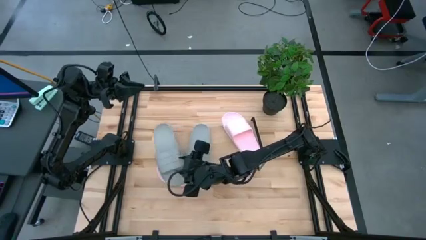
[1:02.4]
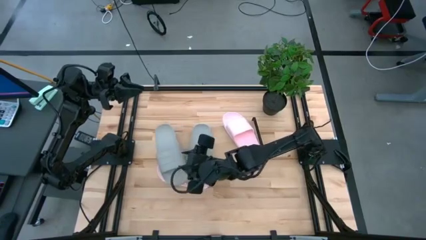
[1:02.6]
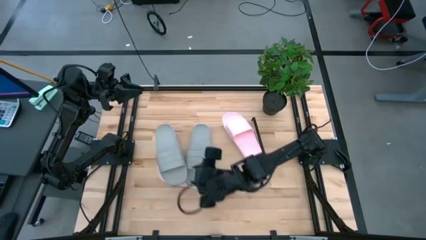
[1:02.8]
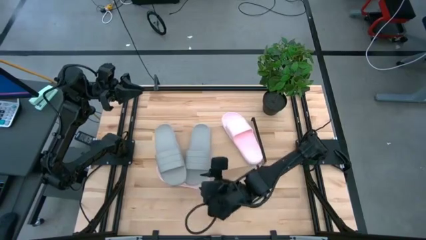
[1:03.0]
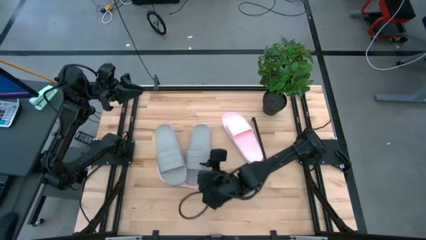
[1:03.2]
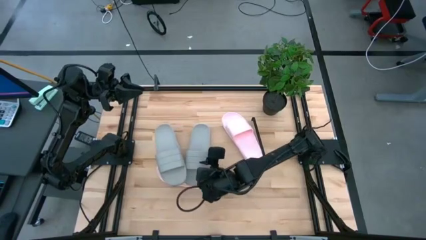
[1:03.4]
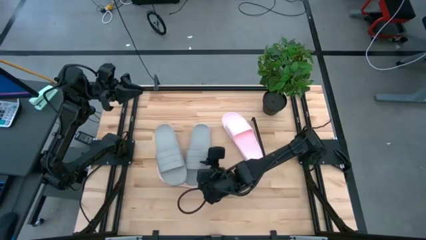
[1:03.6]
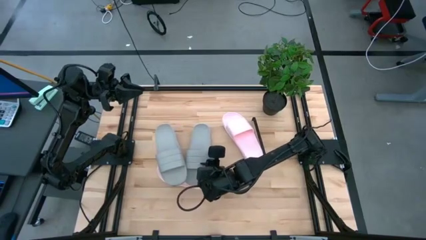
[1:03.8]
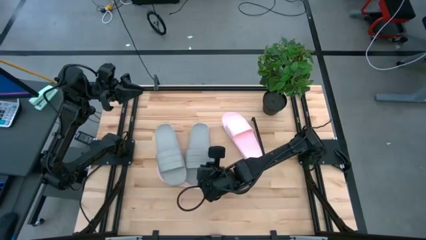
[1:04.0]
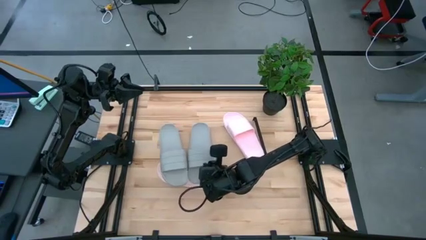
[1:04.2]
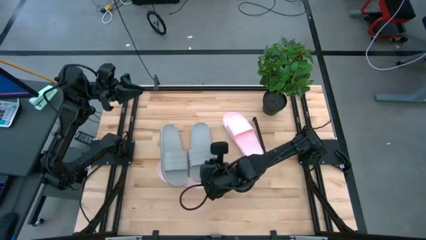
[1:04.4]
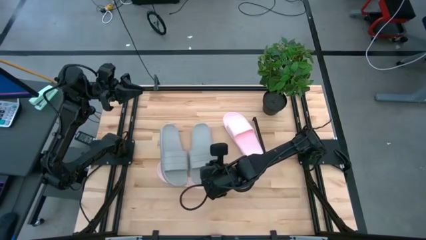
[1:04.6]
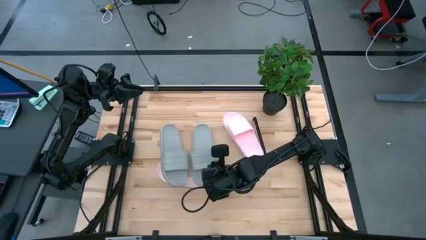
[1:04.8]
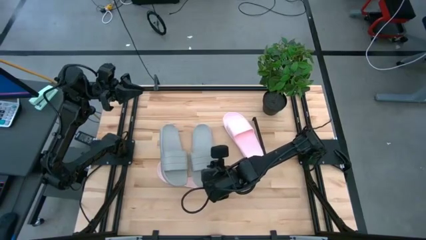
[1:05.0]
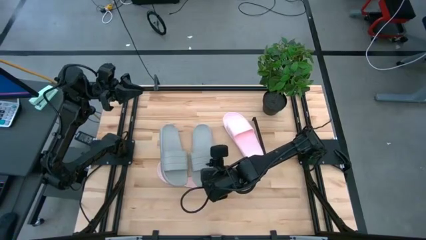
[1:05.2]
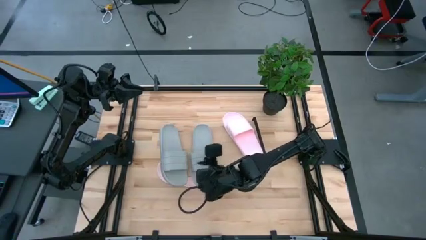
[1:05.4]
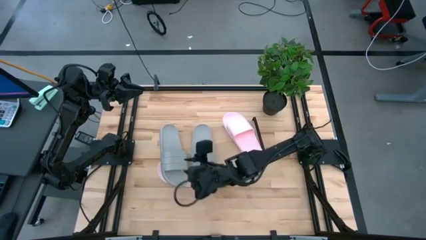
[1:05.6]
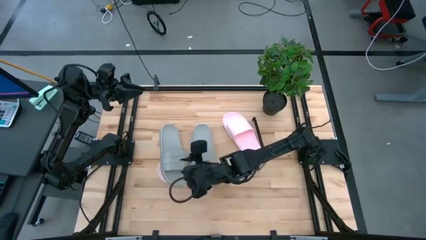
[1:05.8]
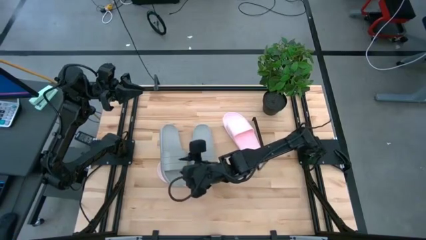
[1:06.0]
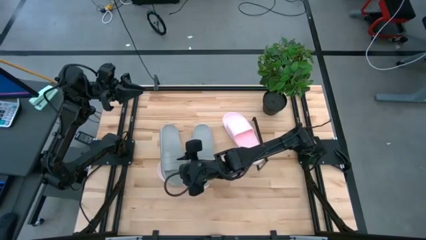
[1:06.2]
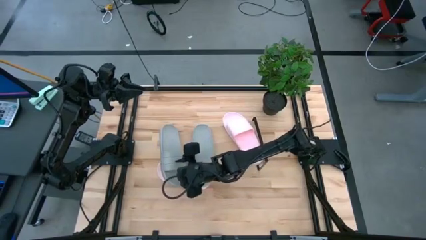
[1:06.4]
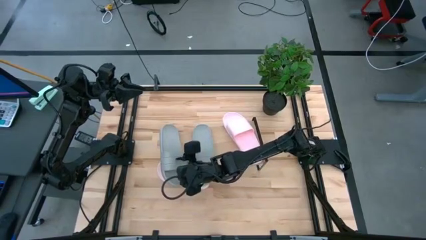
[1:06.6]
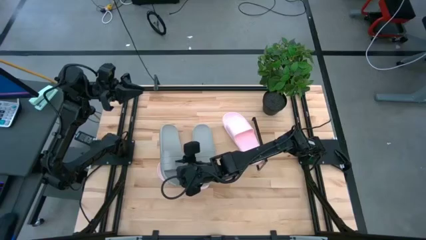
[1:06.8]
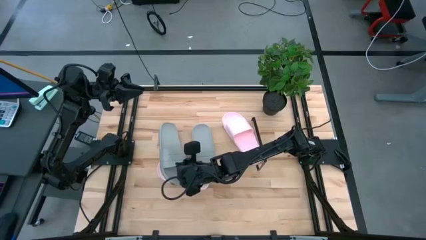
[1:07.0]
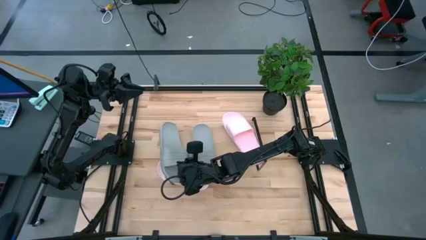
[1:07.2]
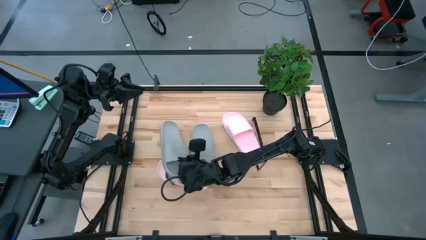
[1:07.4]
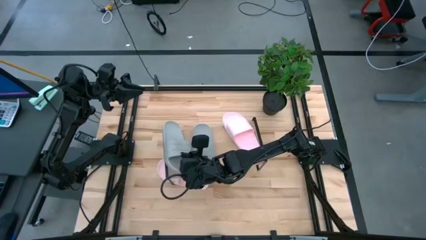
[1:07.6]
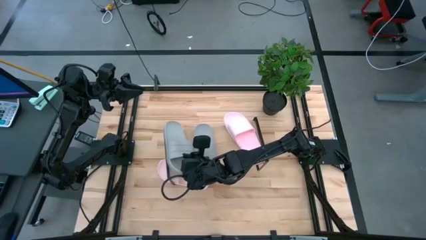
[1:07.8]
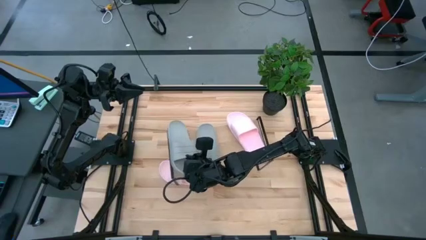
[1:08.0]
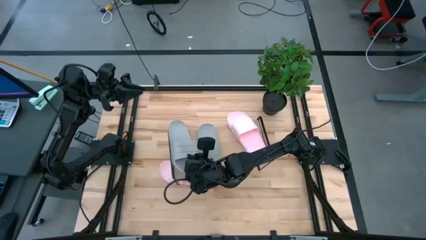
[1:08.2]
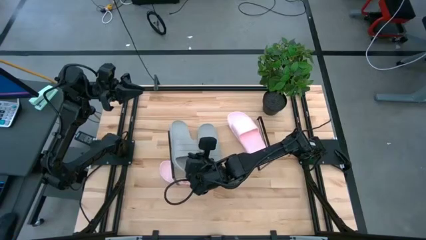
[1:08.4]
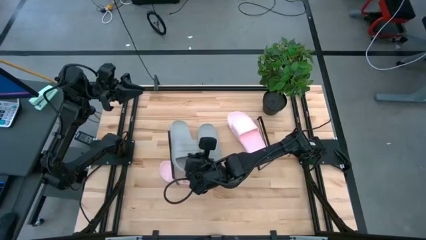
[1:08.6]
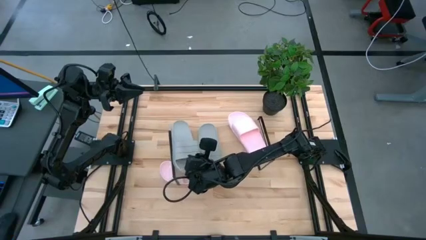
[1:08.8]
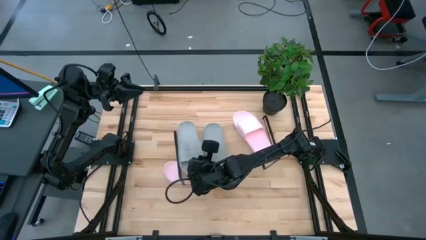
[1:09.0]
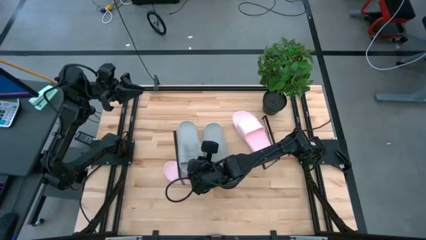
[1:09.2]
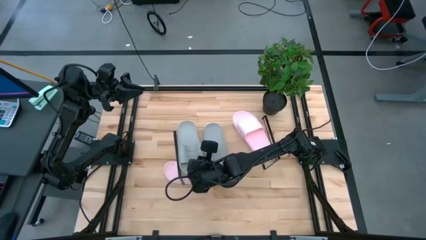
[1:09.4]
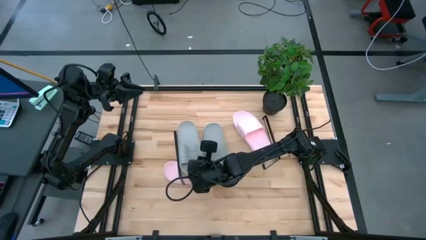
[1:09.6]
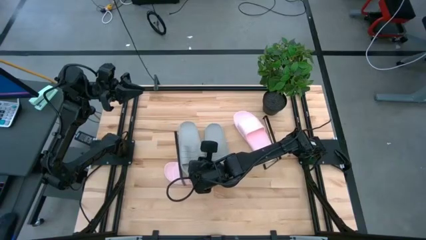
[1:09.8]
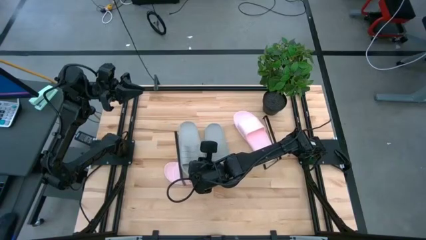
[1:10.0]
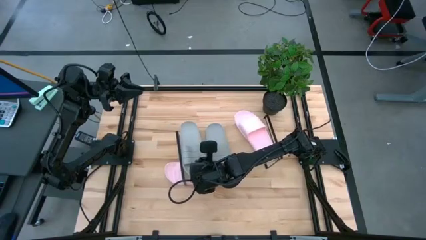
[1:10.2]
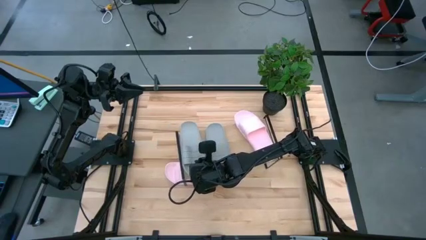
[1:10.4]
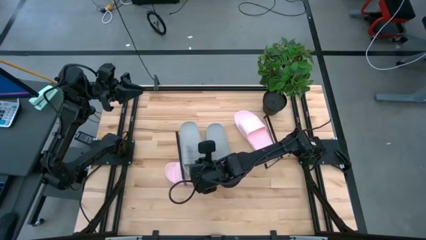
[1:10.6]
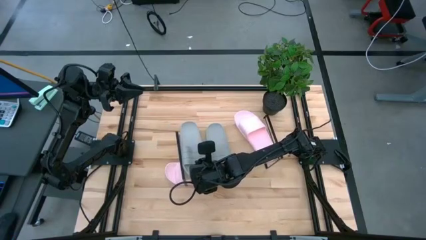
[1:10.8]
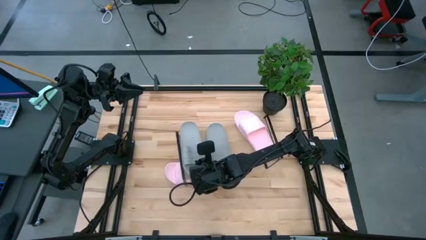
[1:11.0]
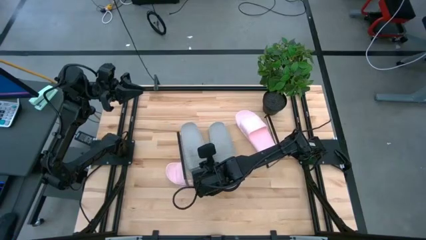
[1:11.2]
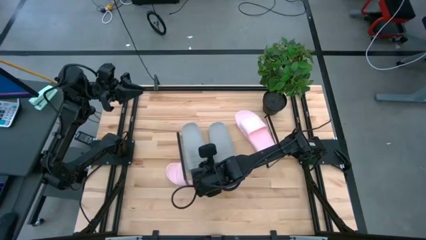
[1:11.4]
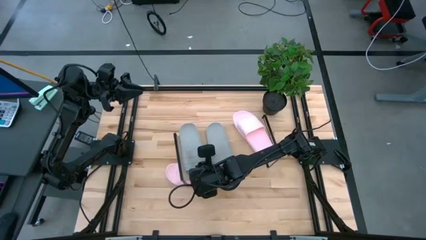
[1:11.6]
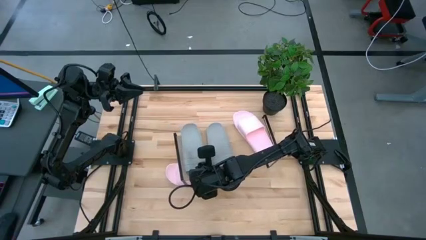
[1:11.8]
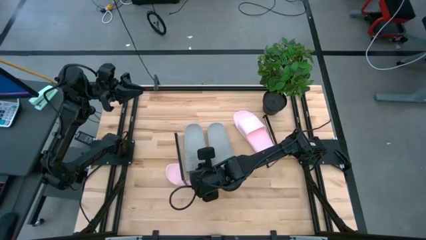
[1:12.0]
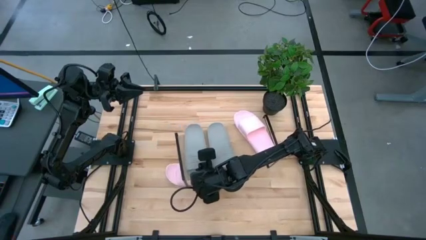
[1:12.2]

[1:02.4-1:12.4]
Task: Pick and place slides into the shelf
Adjust the gray slides on the shelf

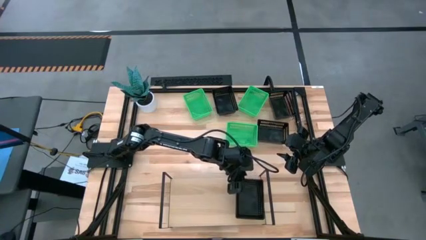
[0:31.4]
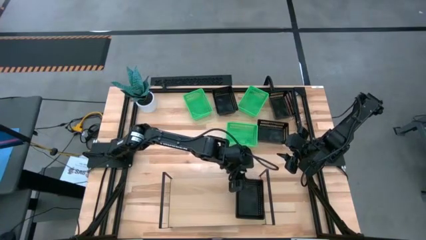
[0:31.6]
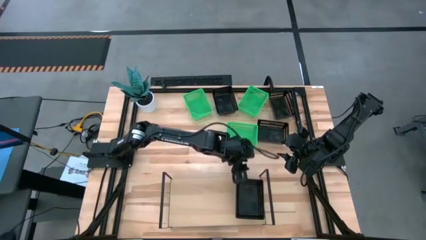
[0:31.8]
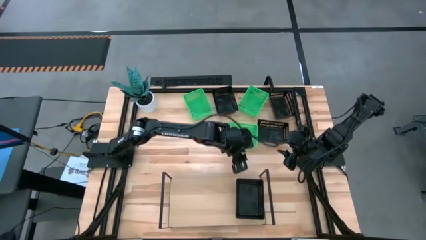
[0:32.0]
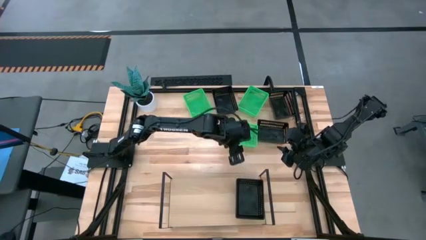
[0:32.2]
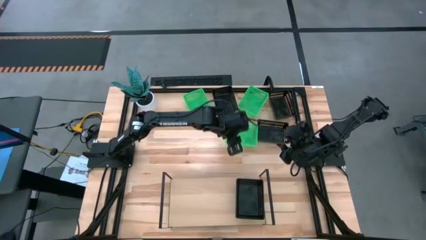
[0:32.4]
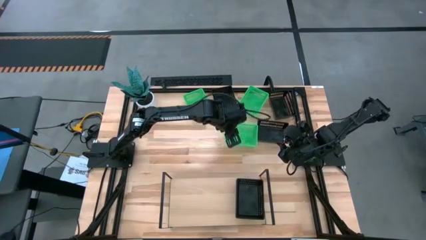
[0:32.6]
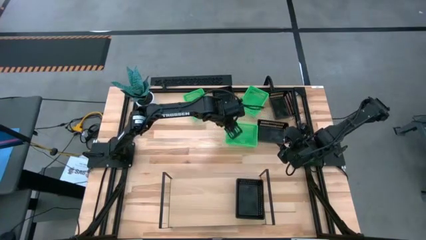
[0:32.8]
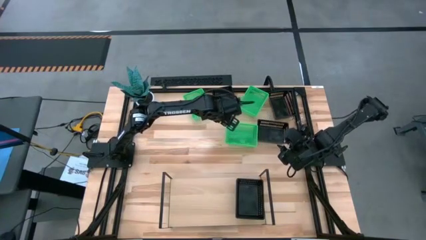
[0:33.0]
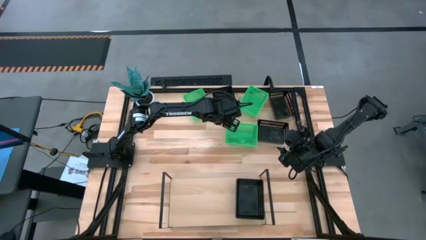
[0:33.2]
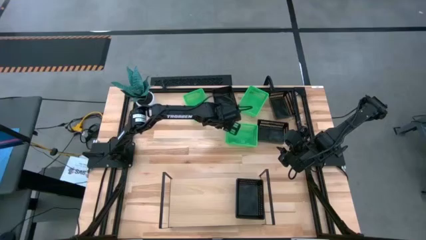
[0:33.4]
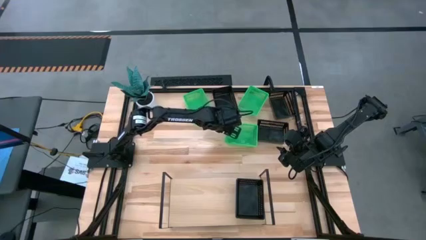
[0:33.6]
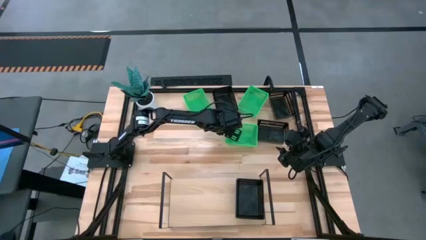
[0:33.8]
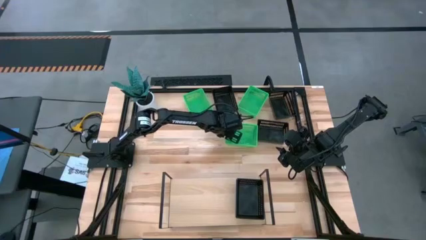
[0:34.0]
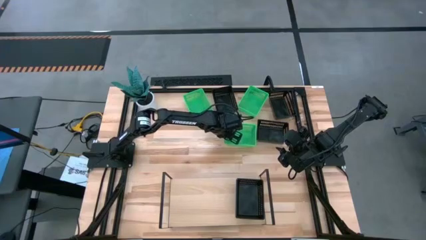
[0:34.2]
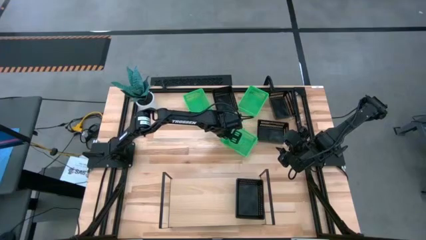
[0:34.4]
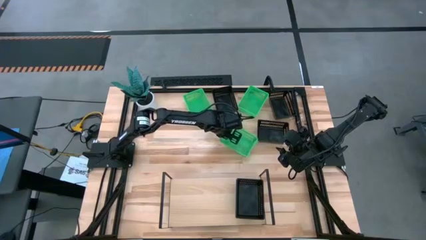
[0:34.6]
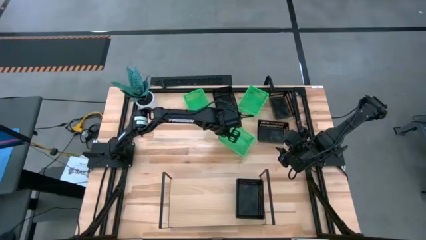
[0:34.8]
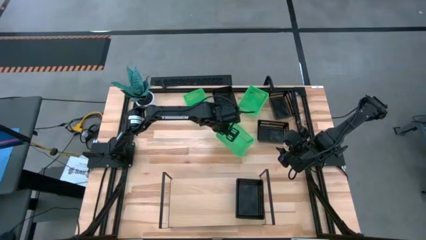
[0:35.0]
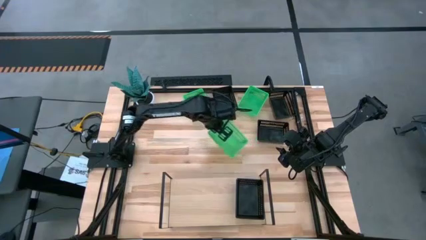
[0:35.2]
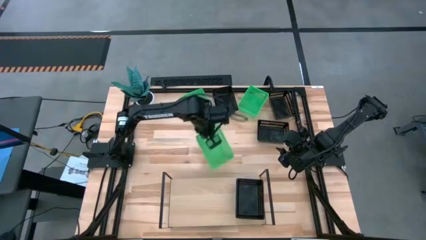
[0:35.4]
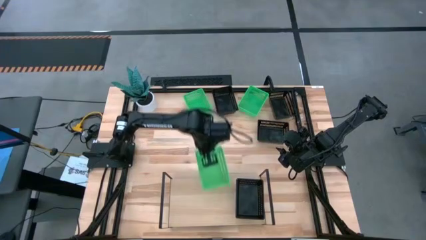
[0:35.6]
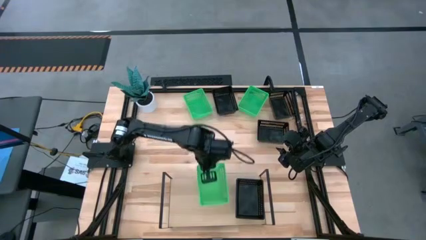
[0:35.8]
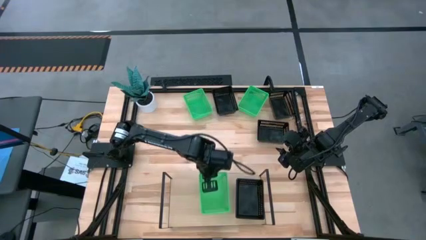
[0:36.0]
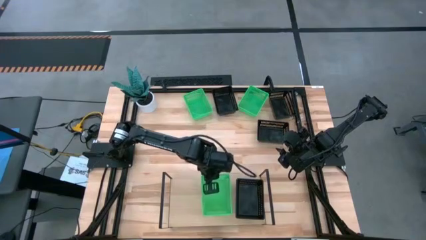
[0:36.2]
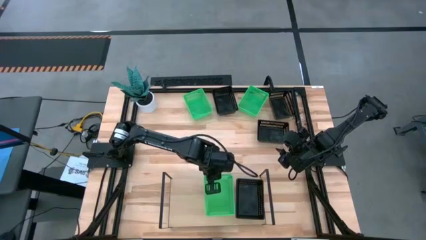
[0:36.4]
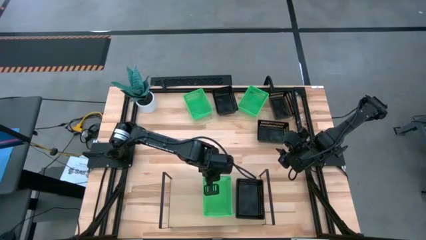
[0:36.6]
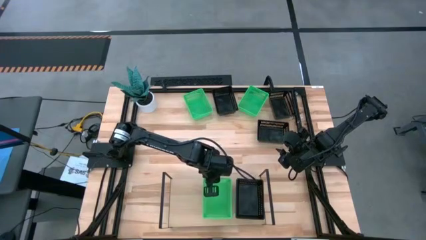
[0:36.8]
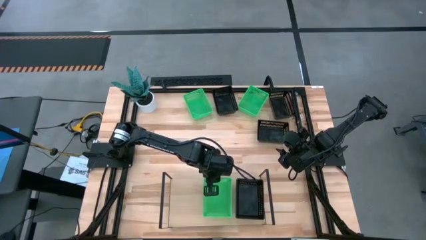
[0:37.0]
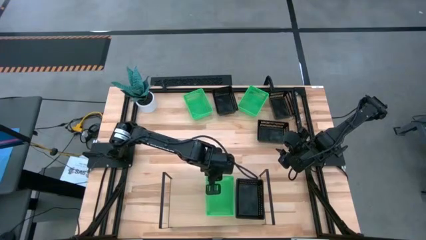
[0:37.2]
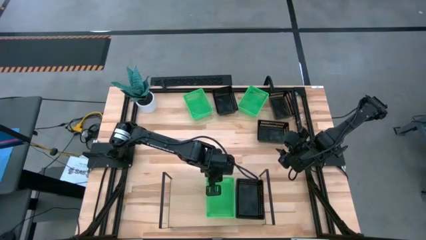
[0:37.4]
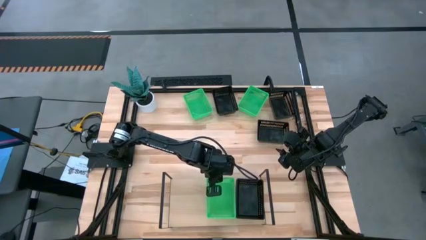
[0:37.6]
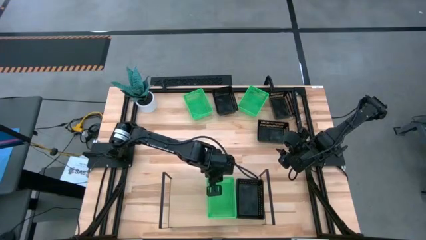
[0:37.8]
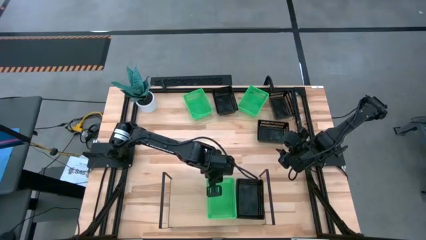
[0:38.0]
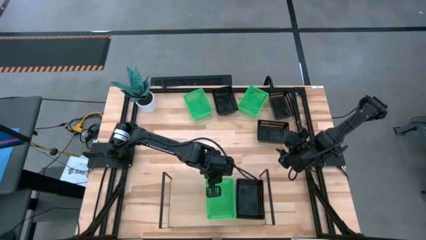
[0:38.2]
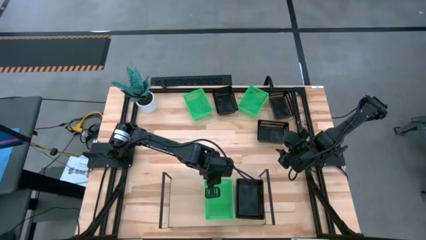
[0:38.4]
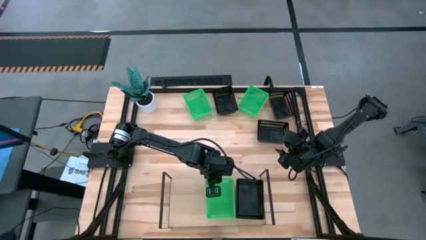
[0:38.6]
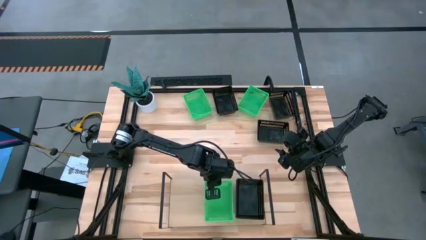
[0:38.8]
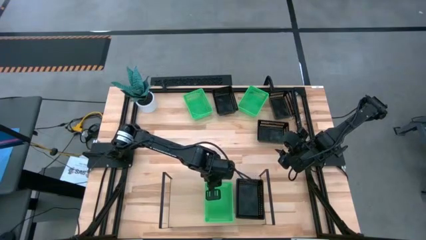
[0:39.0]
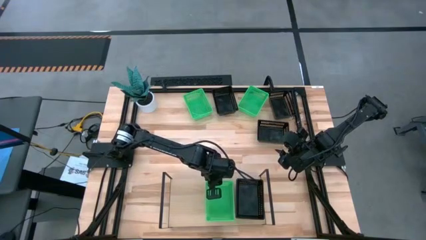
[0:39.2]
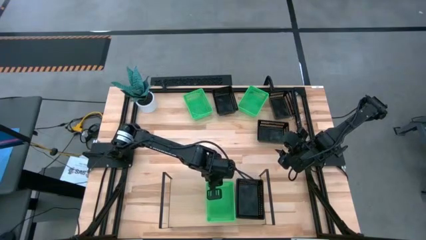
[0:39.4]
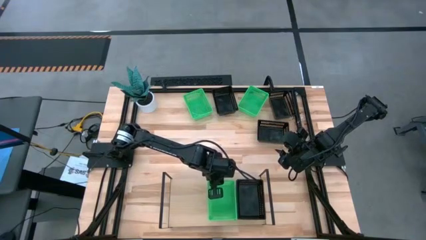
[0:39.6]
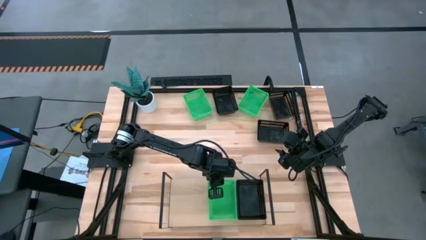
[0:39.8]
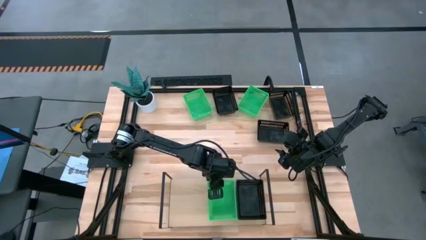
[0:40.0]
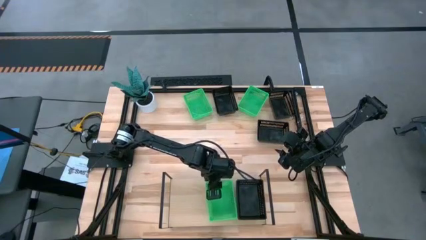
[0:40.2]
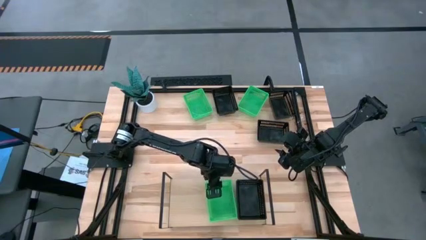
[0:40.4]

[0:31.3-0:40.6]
Task: Stack baskets on shelf by color
Put the bottom green bin on the shelf
